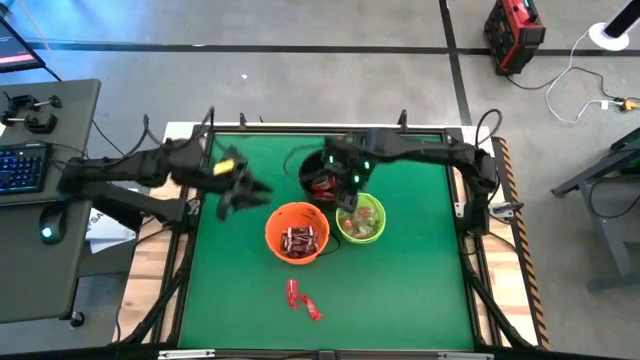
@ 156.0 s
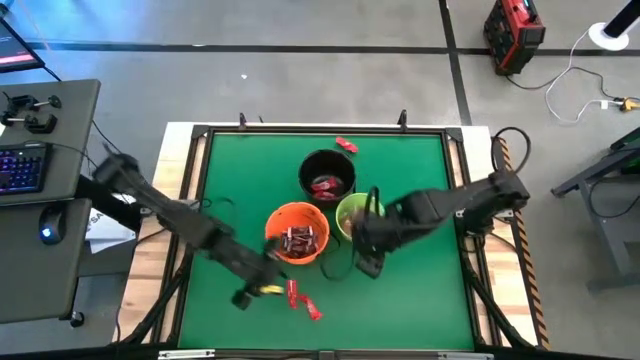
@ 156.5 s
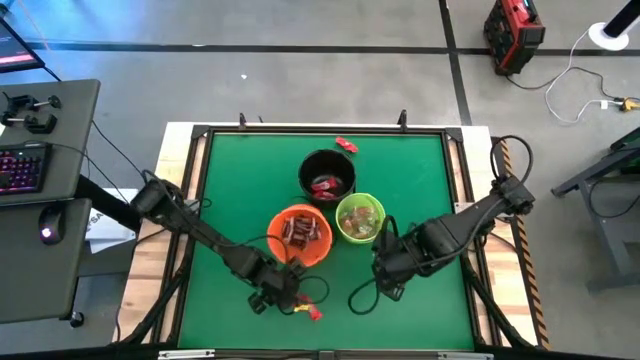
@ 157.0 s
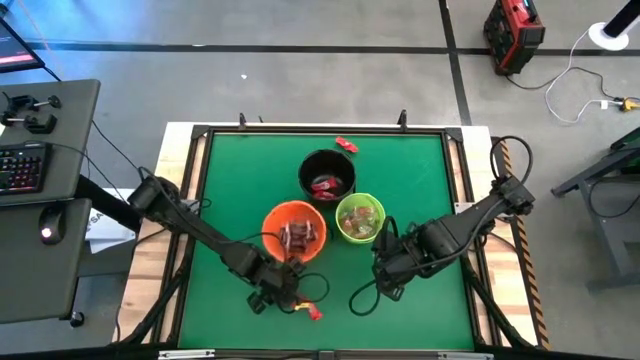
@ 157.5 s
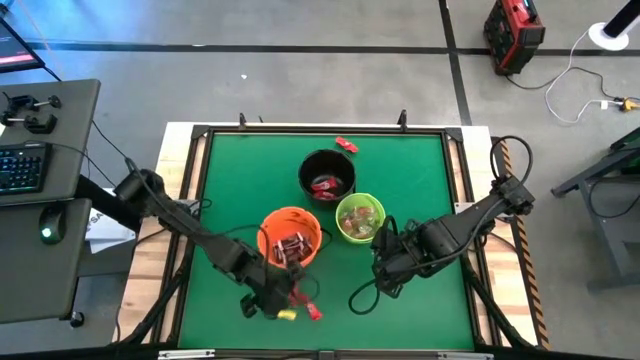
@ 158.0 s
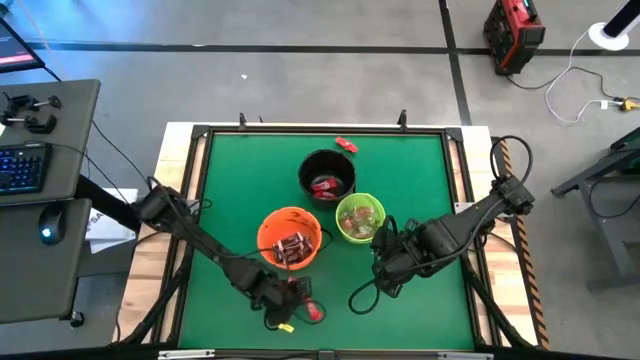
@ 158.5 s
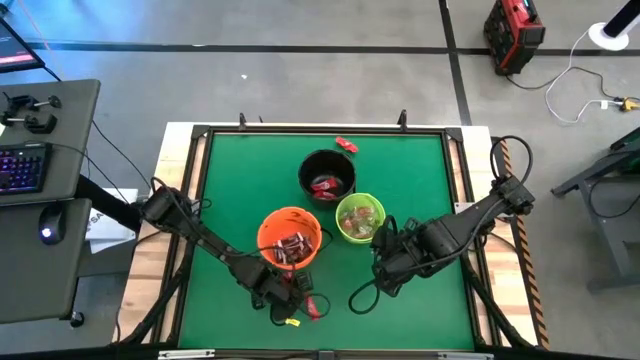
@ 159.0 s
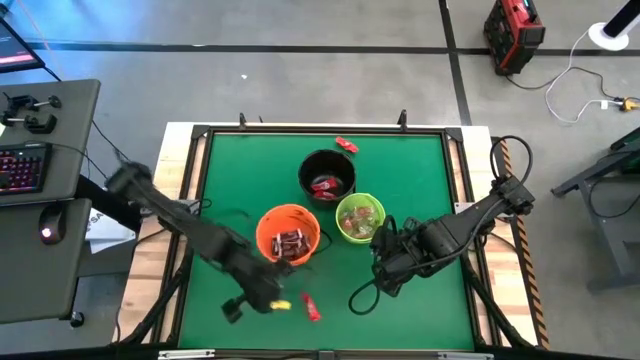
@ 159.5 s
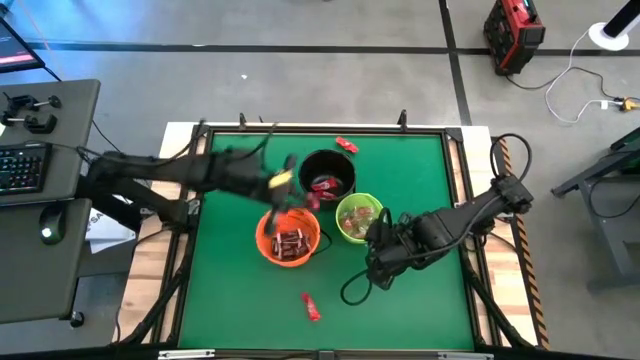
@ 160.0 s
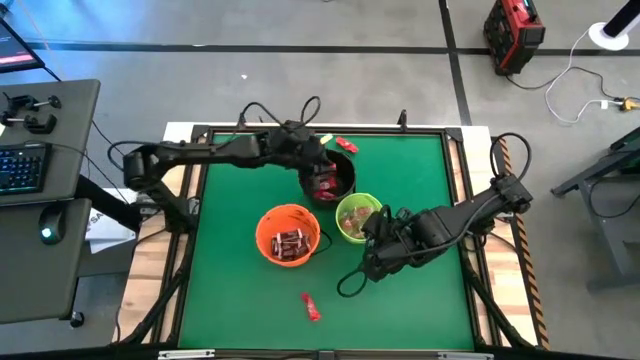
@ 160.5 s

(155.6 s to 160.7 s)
Task: Sort candy by brand, put in halloween buckets
Put the red chocolate bar into black bucket

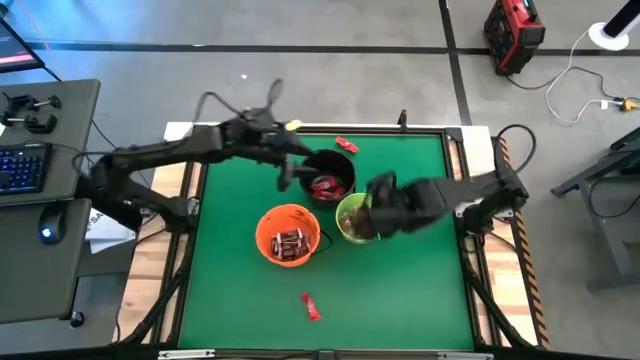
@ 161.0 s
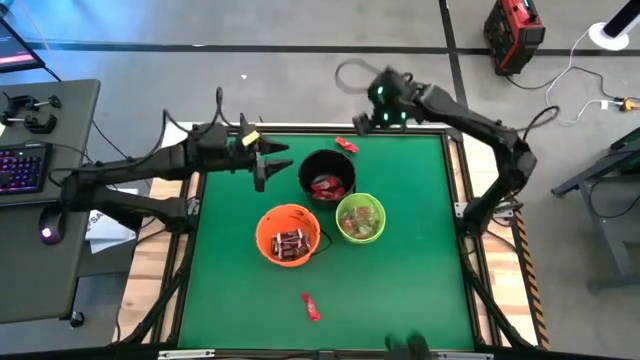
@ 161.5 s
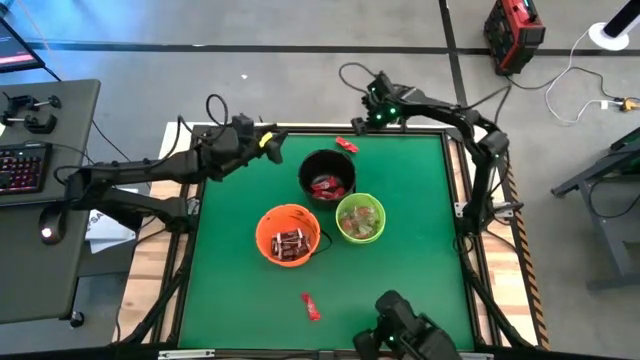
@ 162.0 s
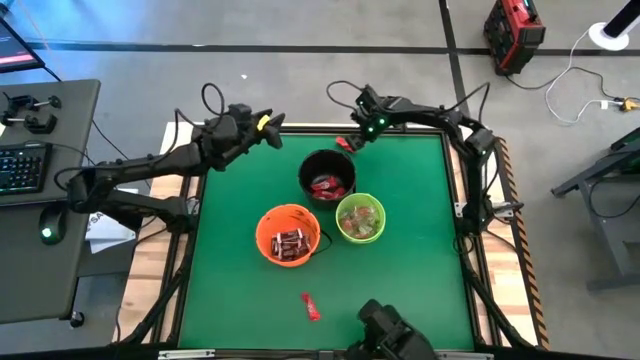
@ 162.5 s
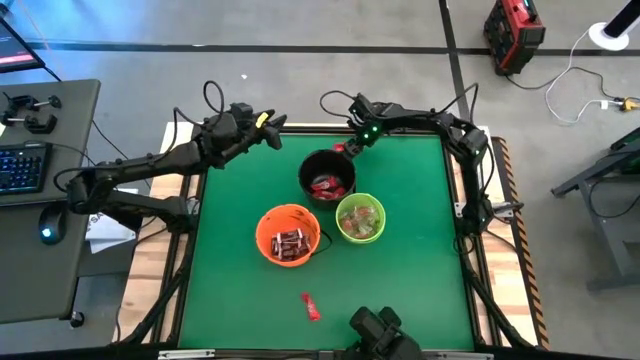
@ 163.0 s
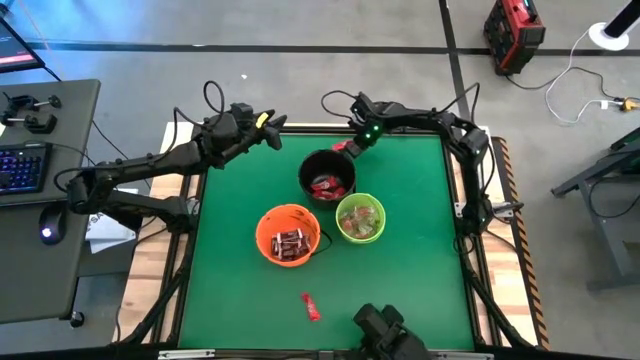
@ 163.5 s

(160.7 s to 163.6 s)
Put the red chocolate bar into black bucket

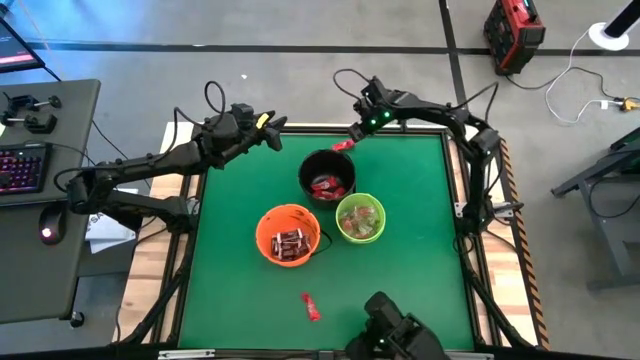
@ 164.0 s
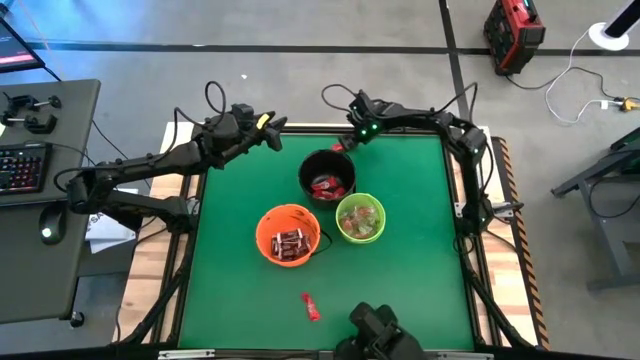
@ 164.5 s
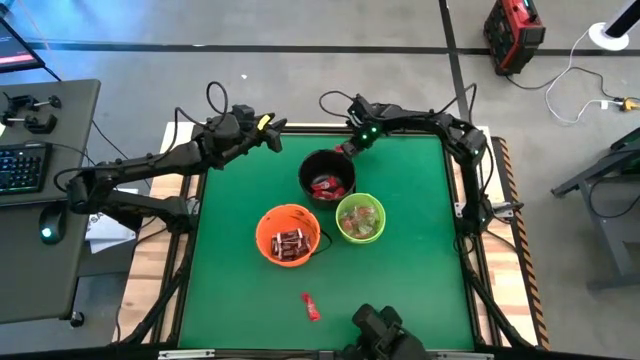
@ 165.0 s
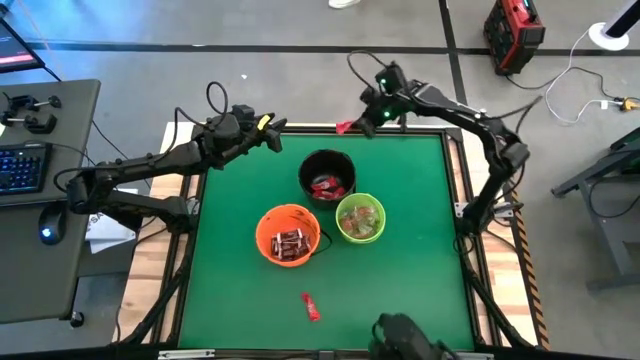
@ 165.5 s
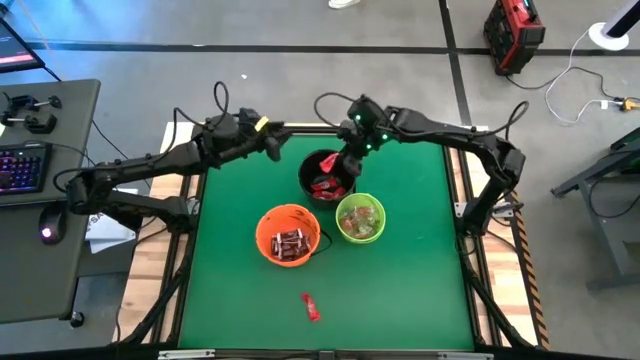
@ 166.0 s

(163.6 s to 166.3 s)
Put the red chocolate bar into black bucket

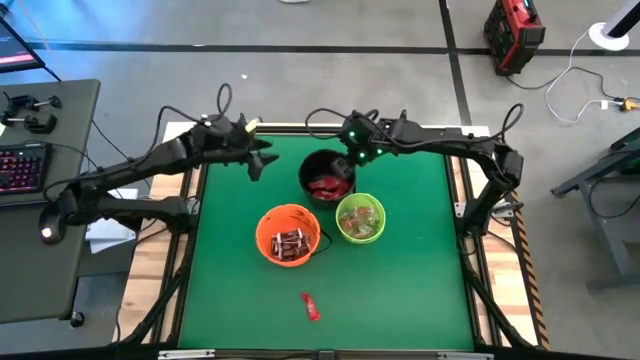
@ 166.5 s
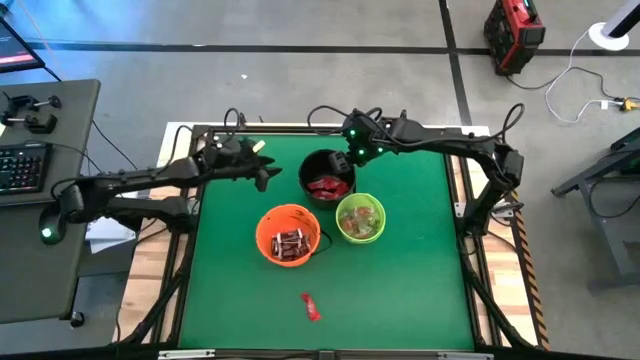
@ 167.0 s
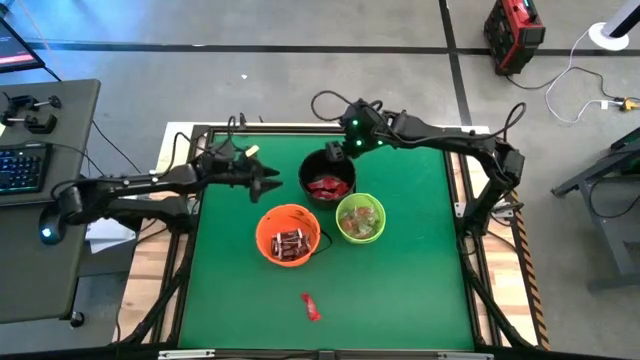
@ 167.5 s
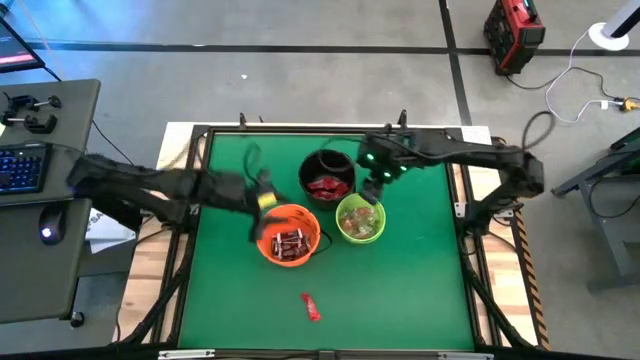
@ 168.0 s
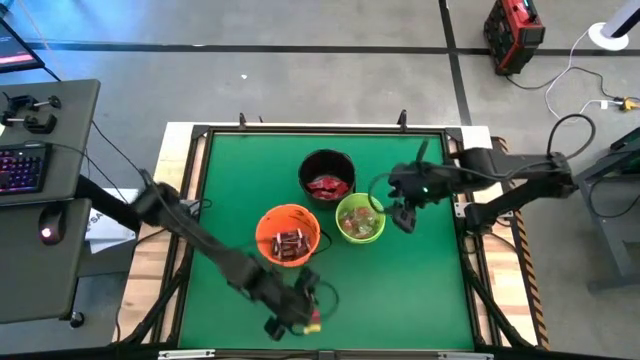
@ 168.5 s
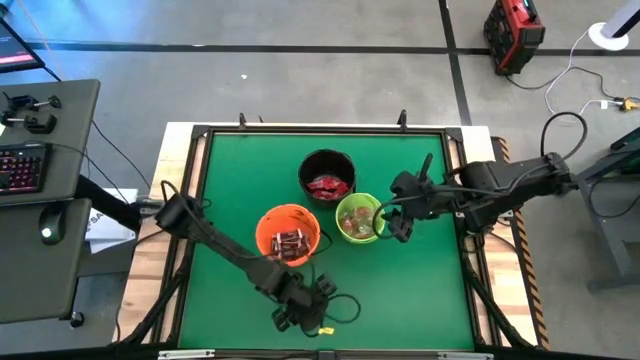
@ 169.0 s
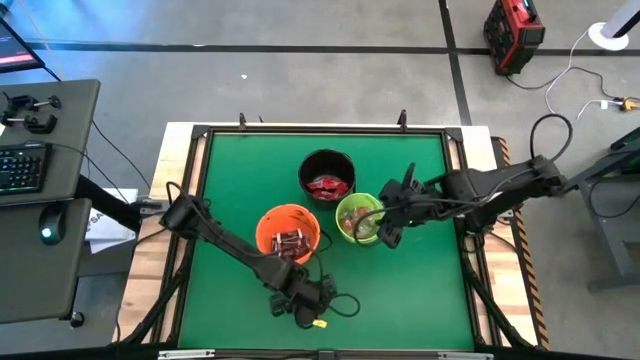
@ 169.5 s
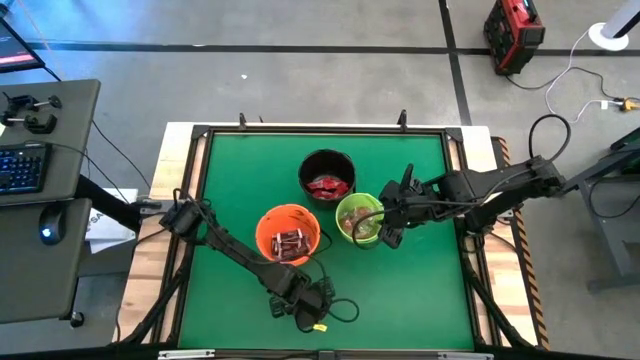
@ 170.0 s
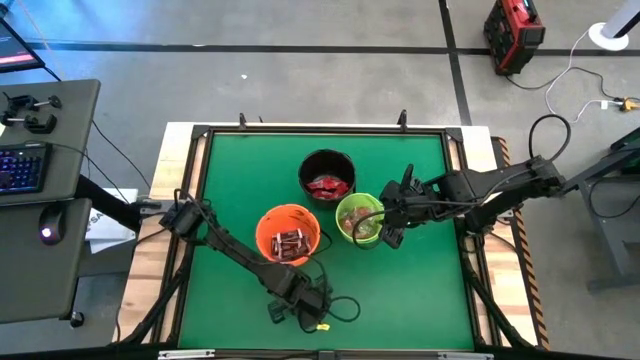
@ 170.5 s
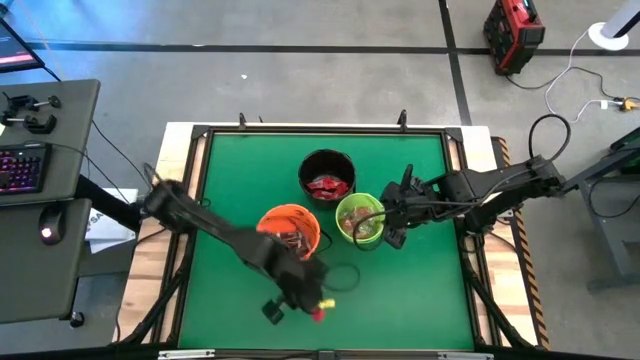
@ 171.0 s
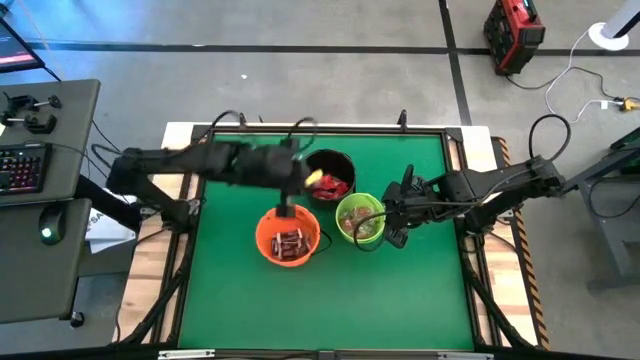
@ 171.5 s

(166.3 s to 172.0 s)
Put the red chocolate bar into black bucket

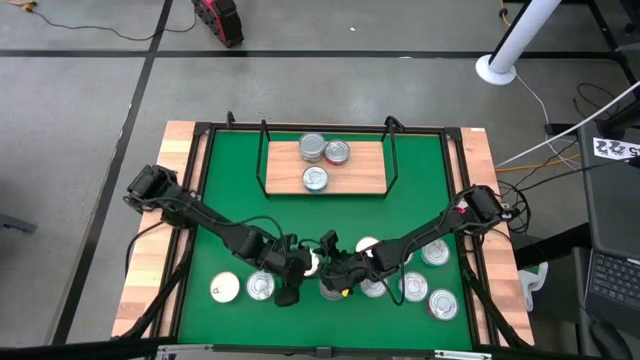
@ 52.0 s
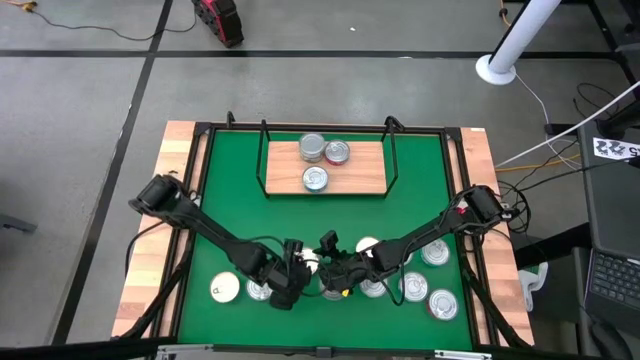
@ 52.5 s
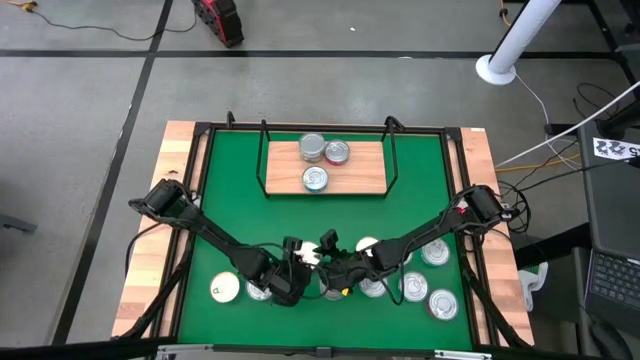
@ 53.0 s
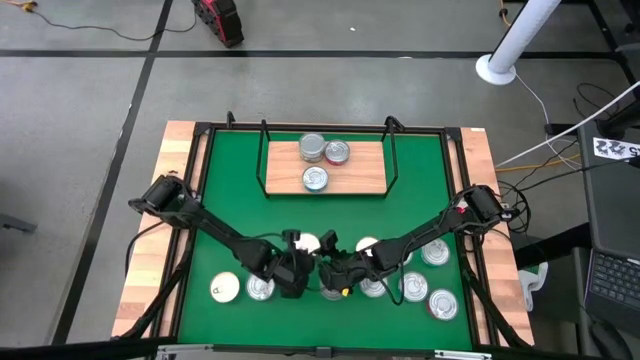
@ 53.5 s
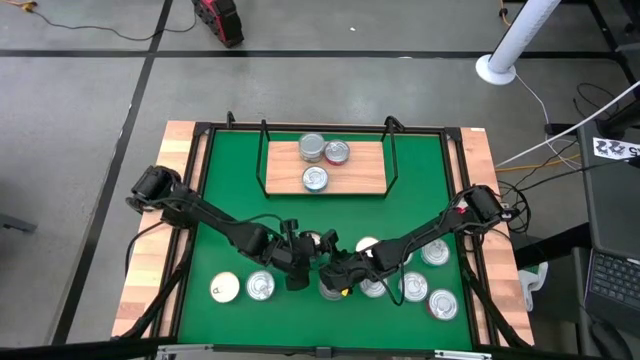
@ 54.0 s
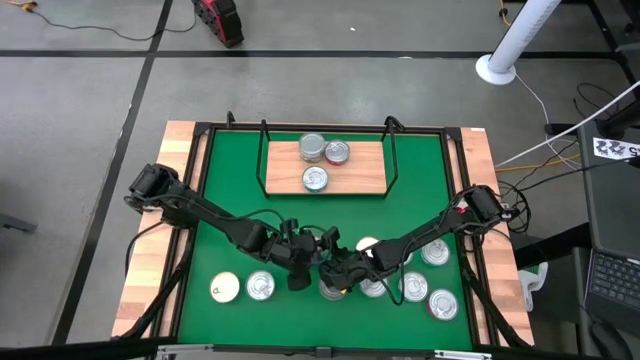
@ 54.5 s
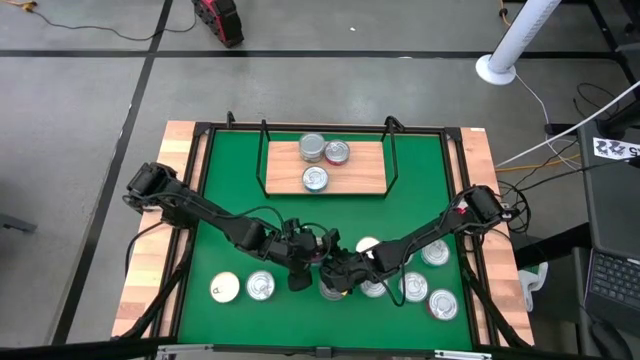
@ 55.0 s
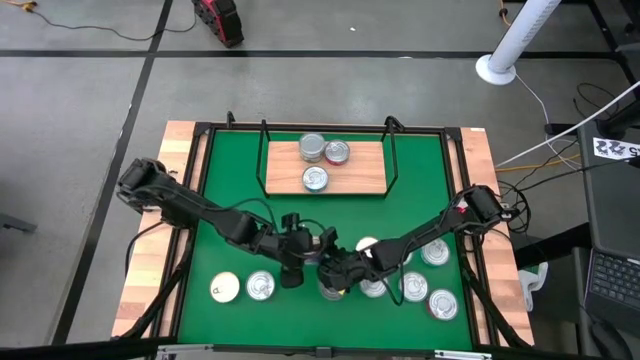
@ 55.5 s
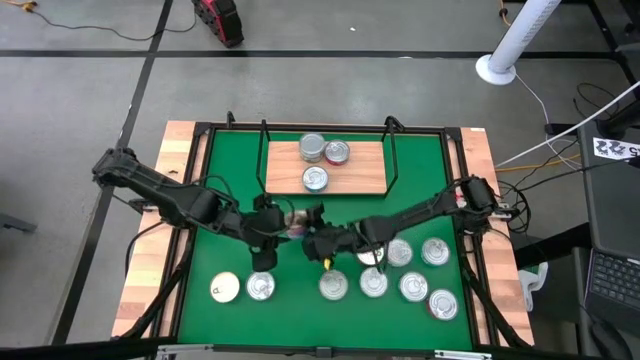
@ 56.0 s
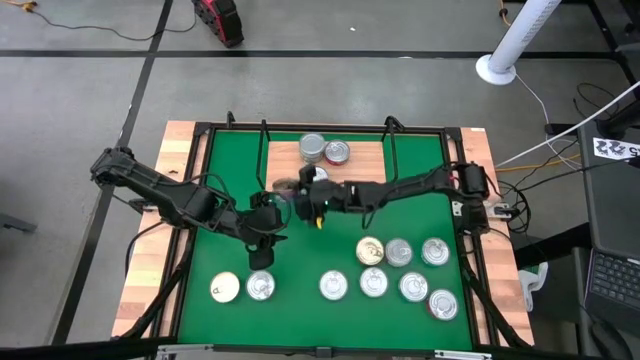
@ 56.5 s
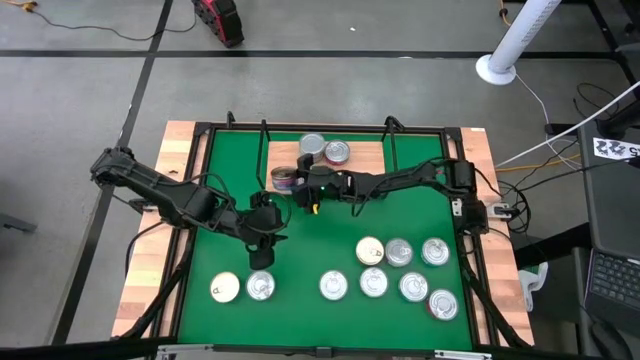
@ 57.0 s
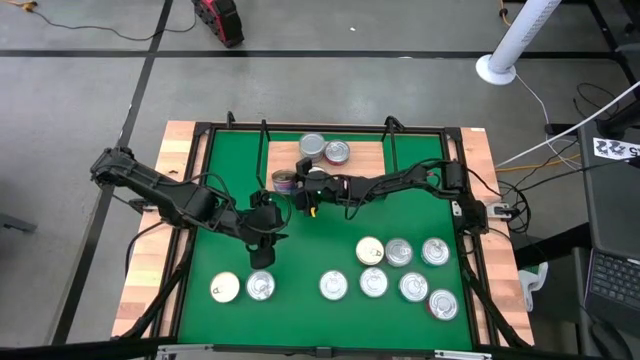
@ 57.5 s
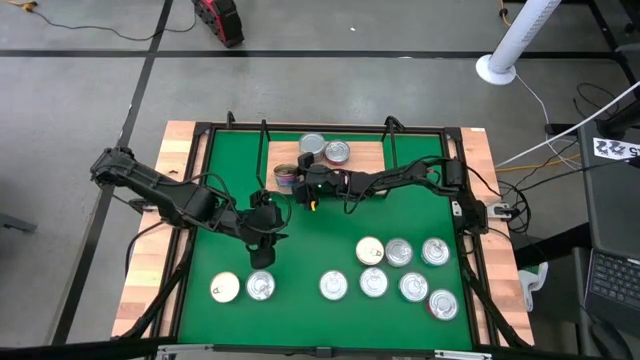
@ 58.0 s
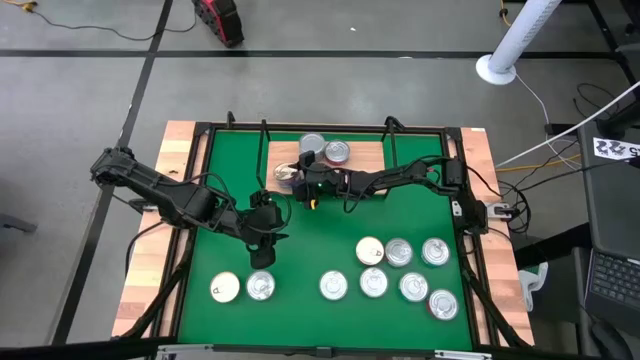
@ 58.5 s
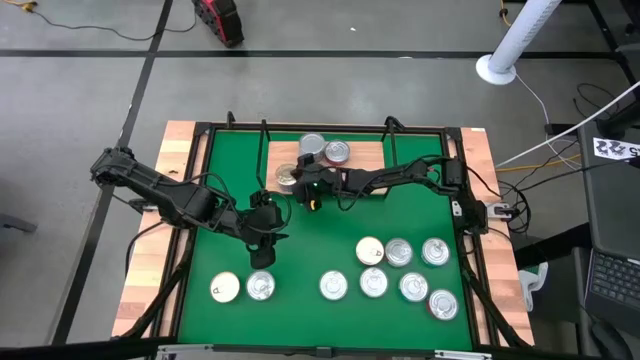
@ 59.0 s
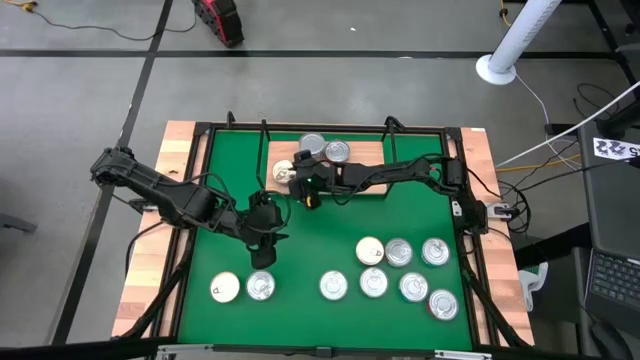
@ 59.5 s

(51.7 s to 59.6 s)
Task: Stack canned seafood by type on shelf
Put the blue pink tuna can on the shelf
